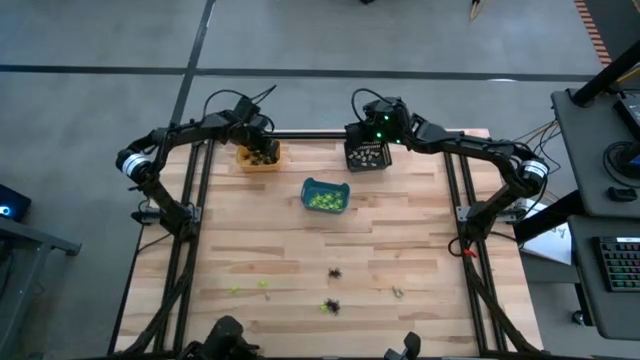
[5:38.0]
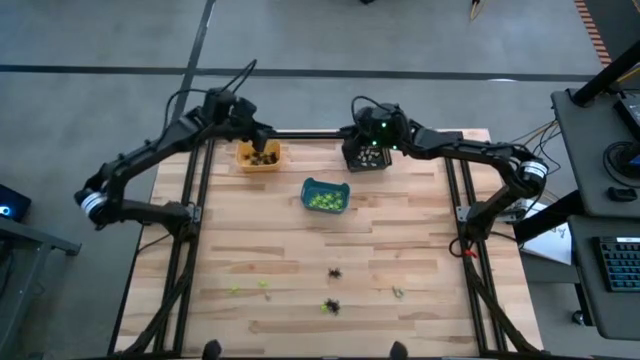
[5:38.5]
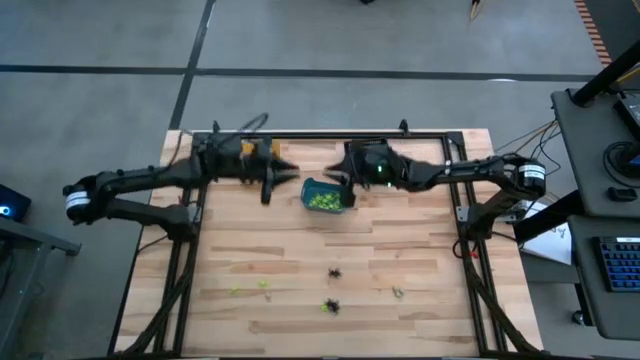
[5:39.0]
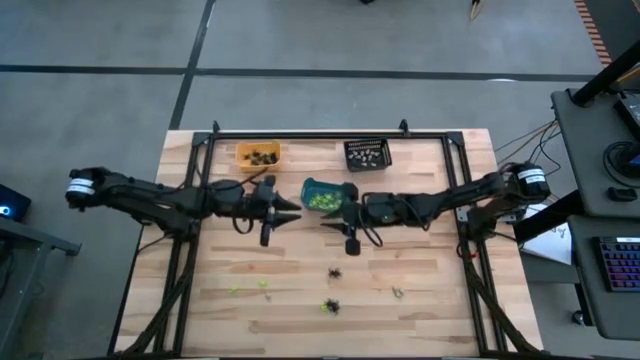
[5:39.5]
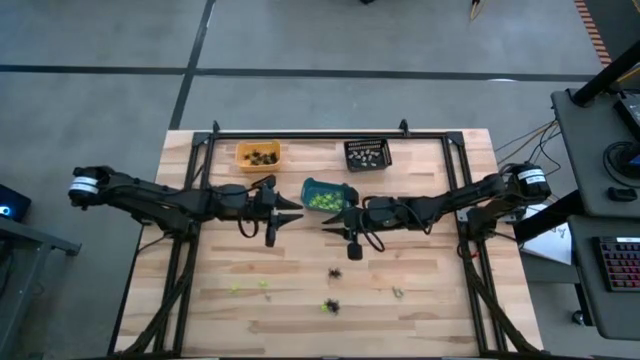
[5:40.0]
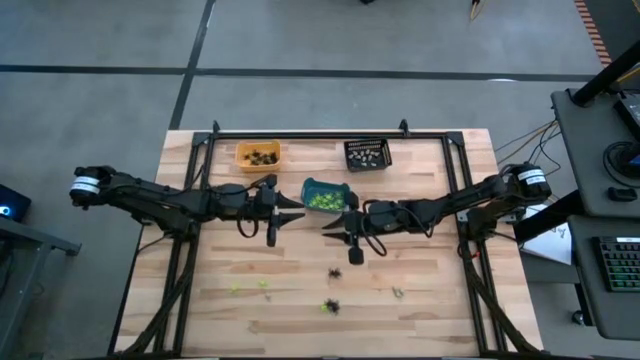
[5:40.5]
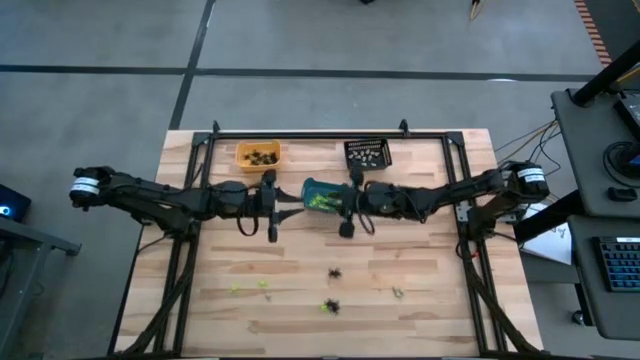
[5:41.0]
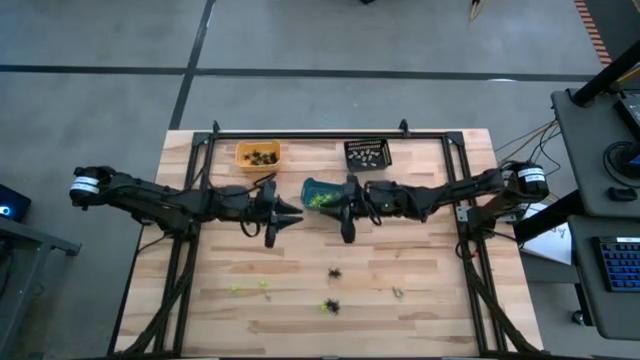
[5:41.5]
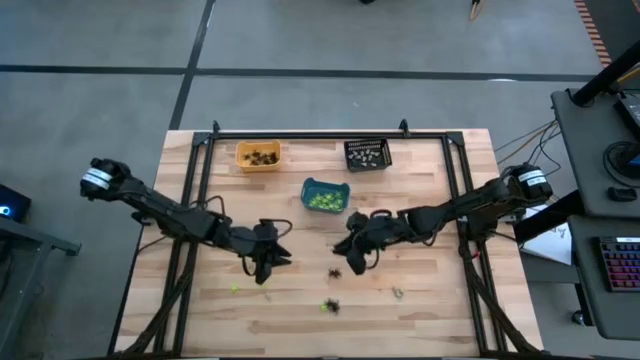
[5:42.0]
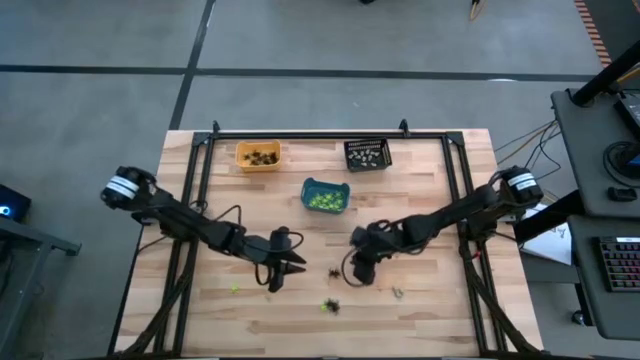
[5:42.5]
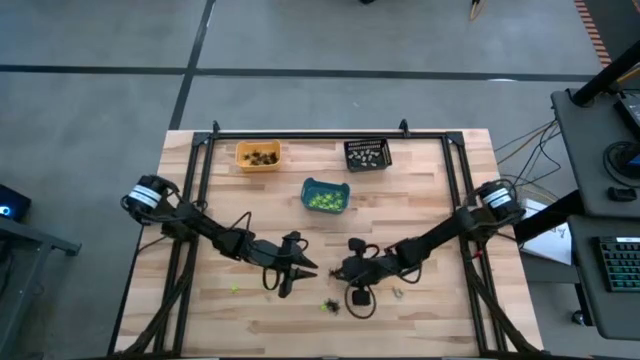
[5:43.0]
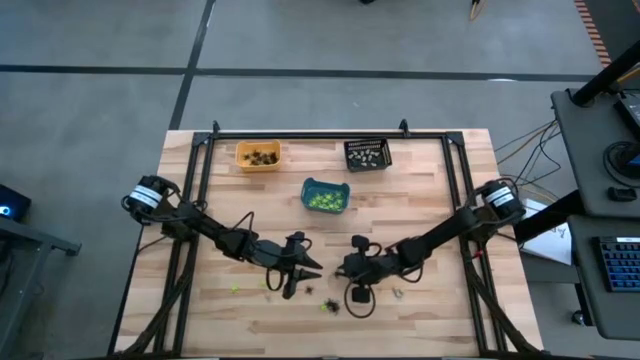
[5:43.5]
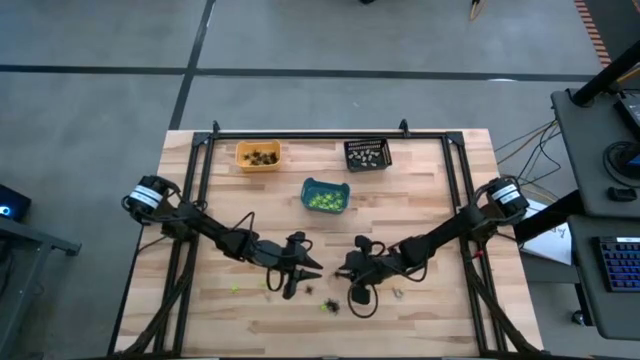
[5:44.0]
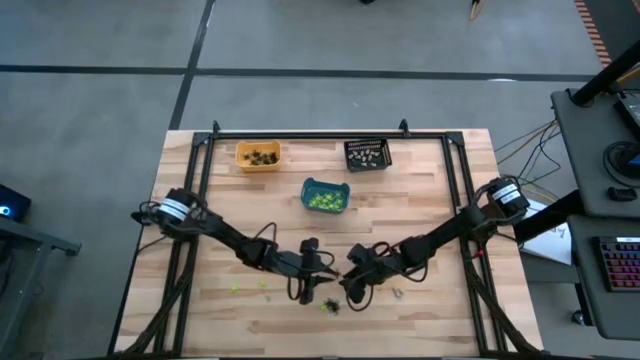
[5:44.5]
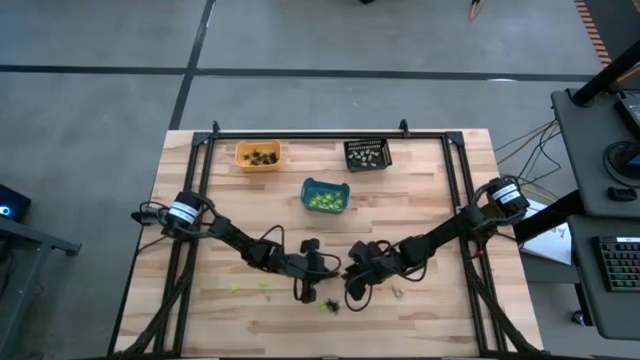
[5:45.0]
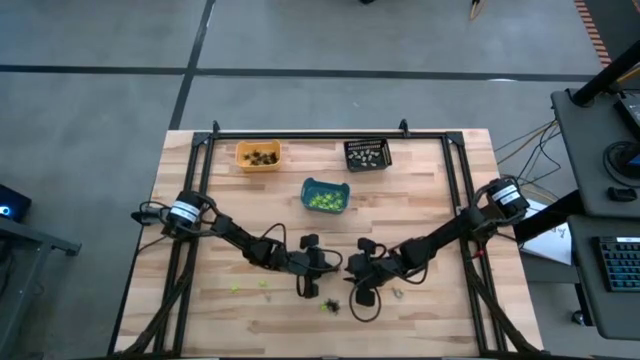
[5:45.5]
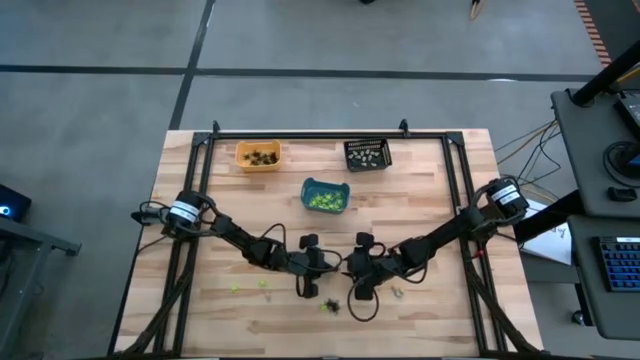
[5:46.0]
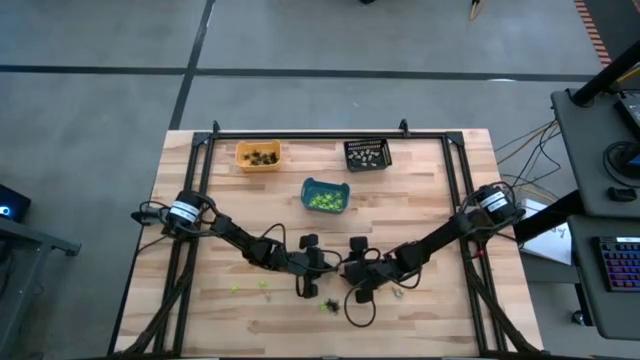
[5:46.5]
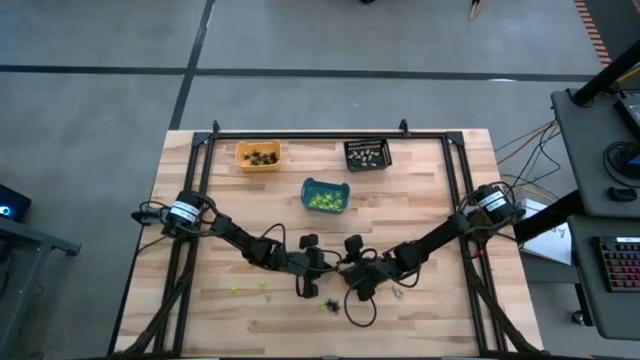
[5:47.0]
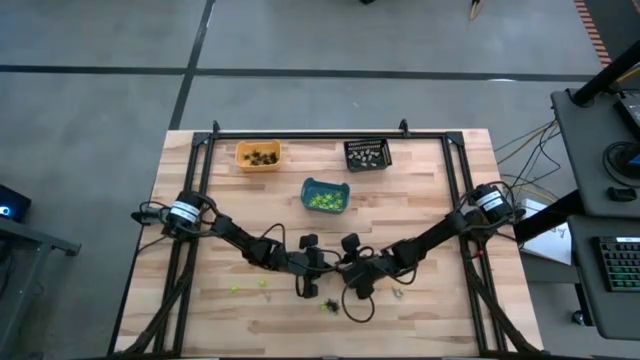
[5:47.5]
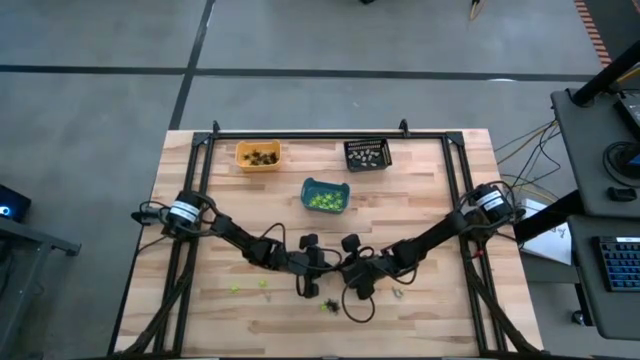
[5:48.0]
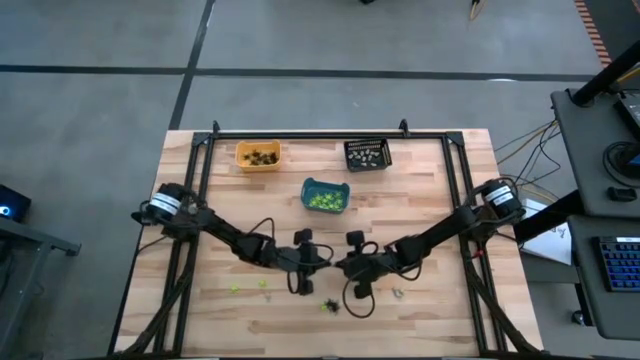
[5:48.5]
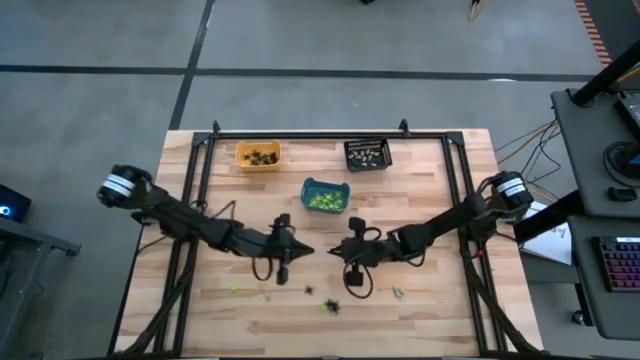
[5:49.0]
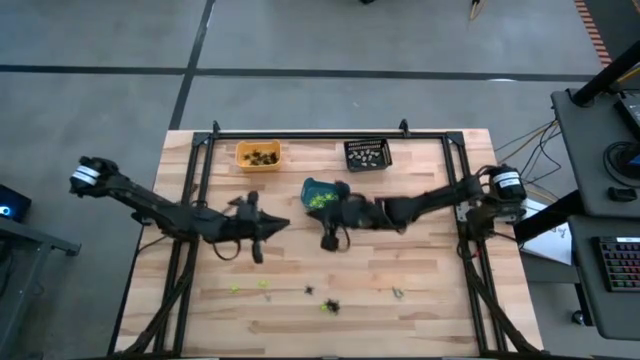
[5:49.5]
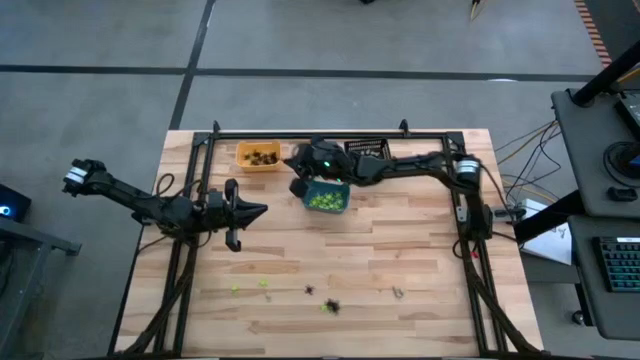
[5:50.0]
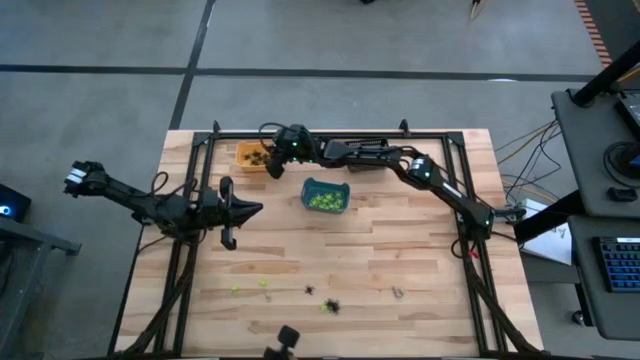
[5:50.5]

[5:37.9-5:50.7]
Task: Sort Halloween decoration
Put the black spider toy into the yellow bin

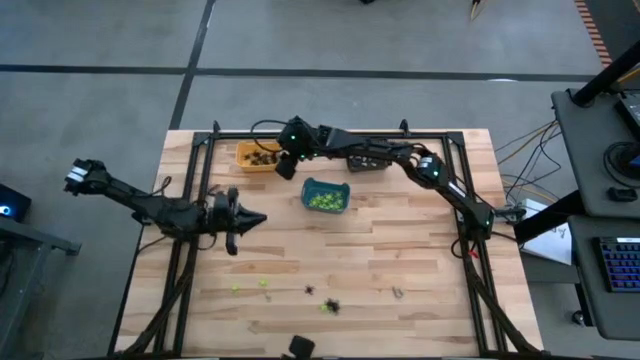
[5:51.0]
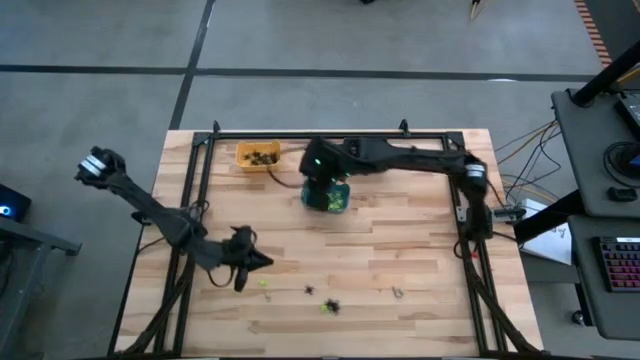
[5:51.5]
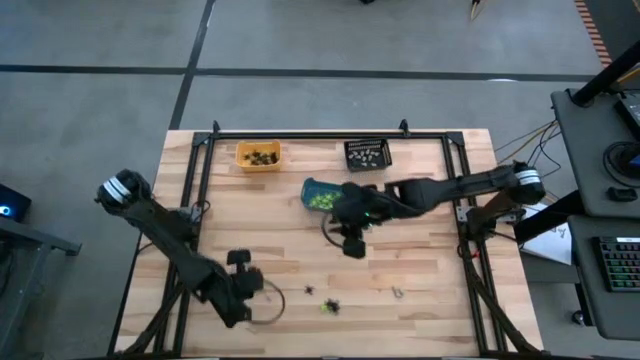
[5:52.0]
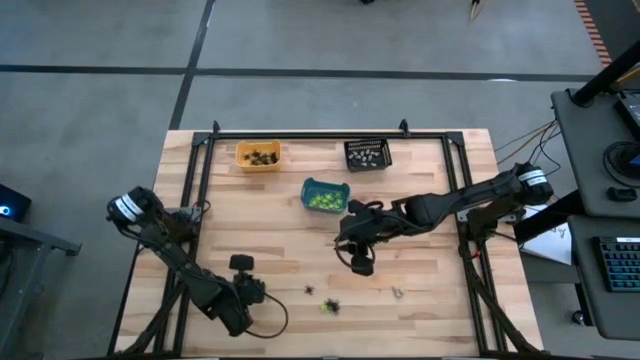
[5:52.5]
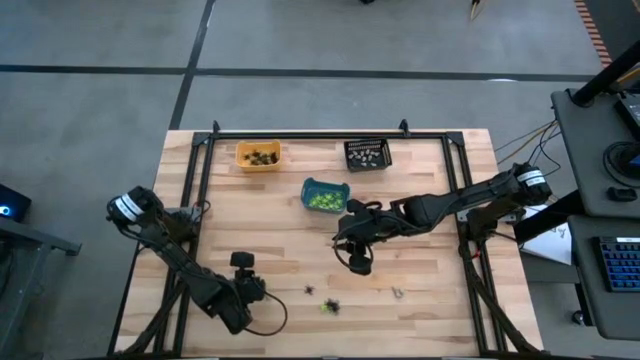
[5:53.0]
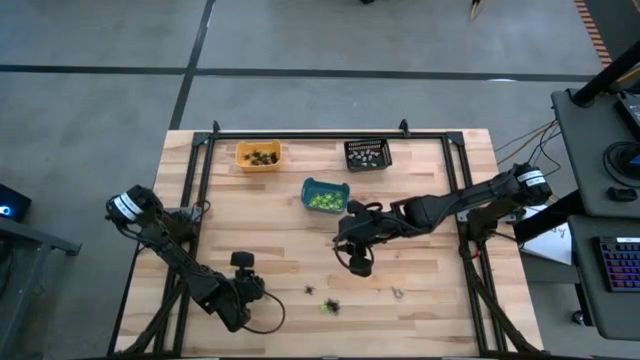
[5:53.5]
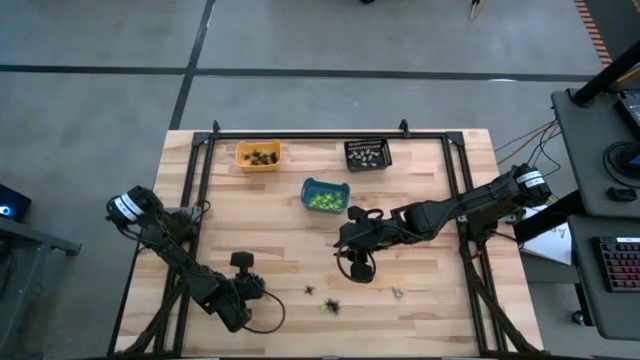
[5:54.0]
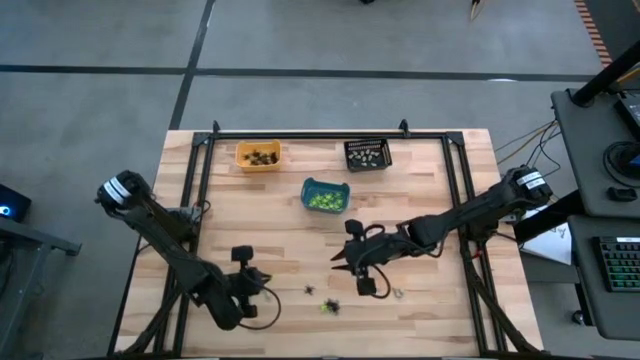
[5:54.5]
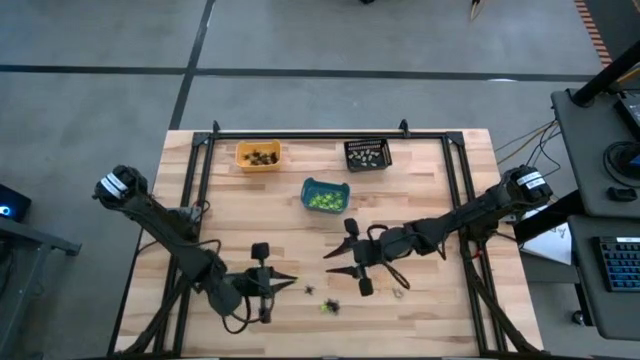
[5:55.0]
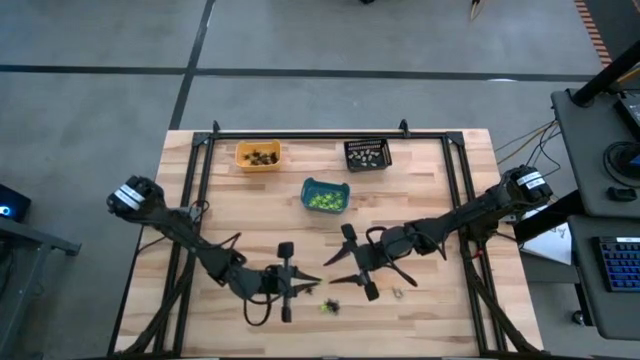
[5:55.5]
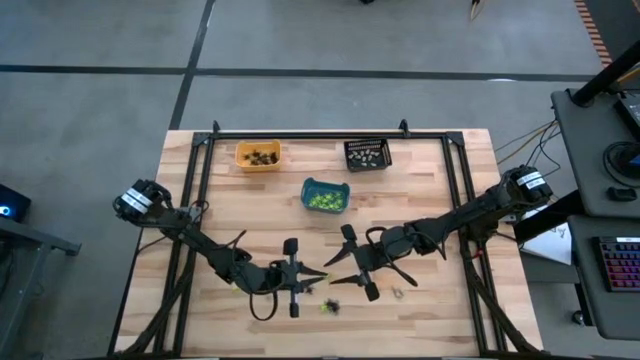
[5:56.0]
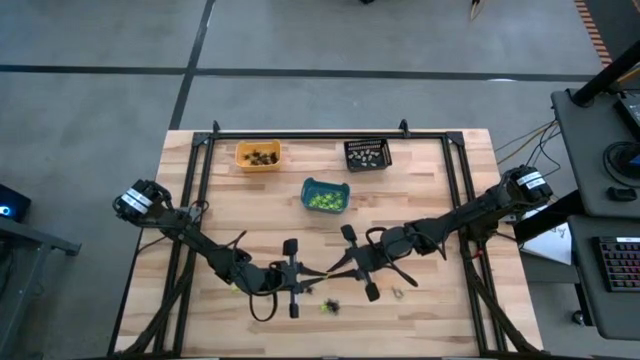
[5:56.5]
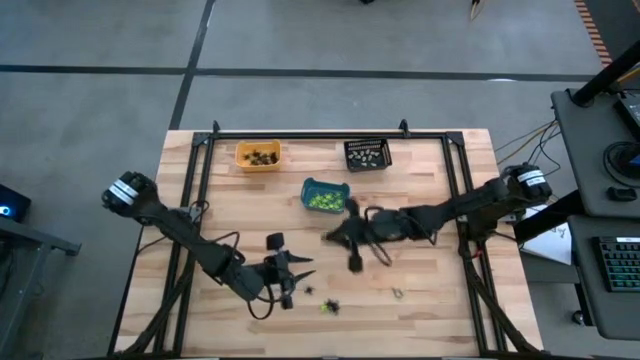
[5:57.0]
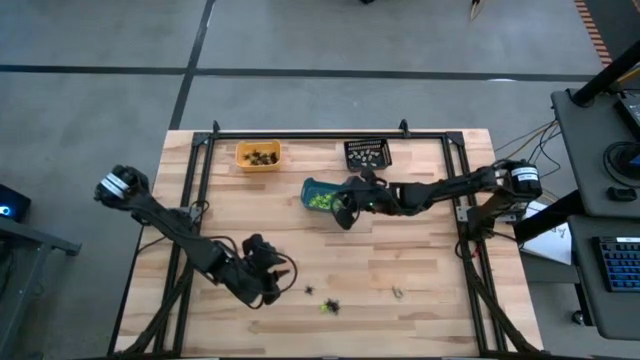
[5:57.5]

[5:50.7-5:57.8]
Put the green spider toy into the blue bin

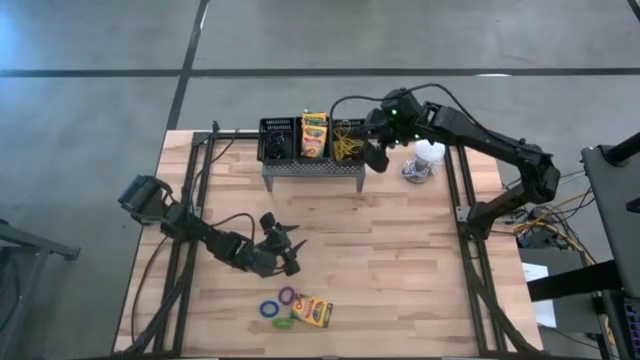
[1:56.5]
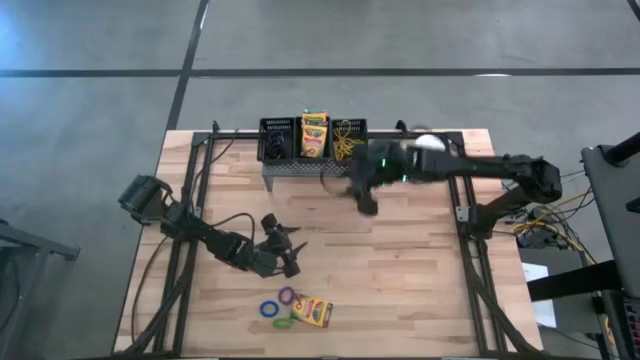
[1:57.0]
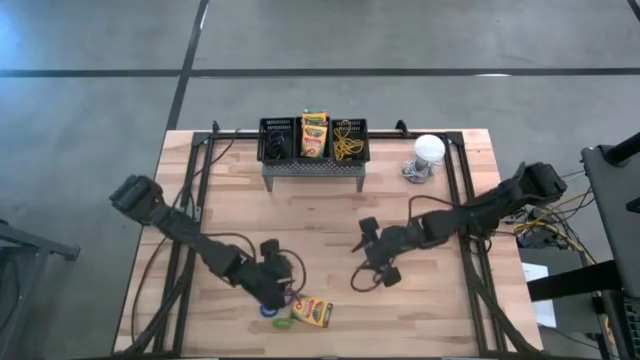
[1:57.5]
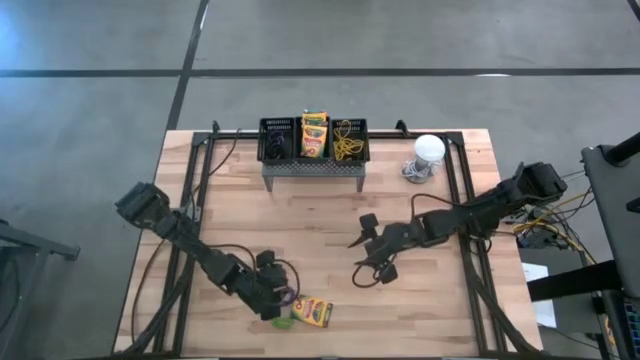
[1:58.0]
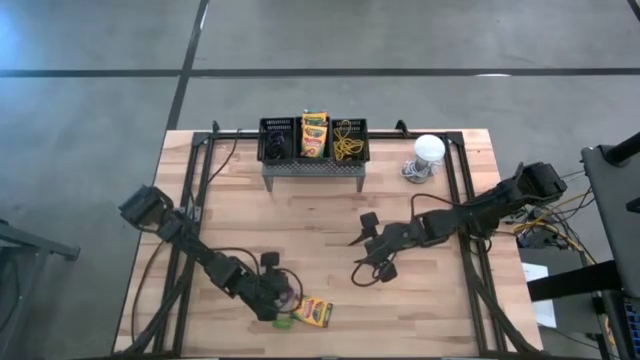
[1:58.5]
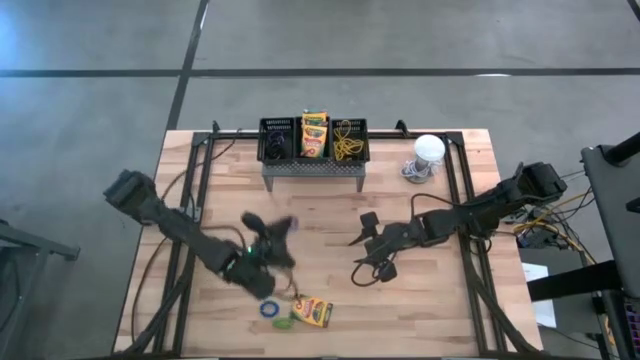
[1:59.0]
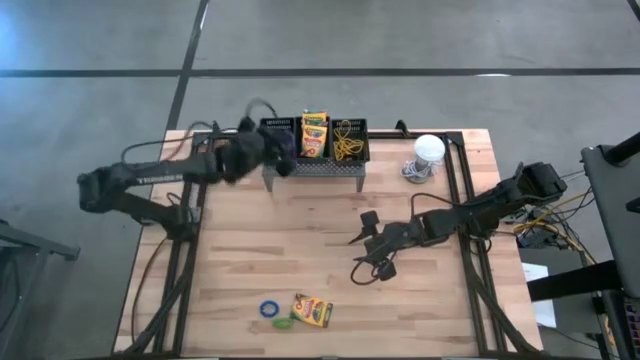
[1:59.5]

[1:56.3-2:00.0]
Task: Pick & Place Office Desk Supplies
Put the purple spring keychain into the left black basket on the shelf
